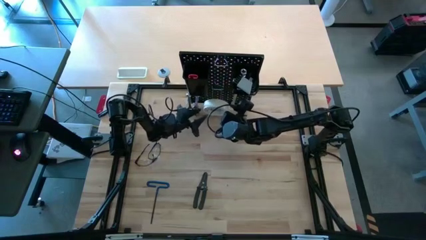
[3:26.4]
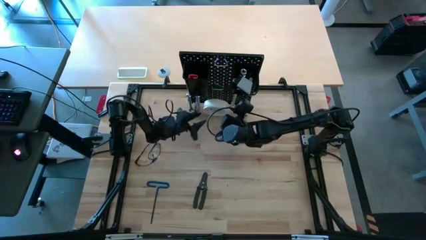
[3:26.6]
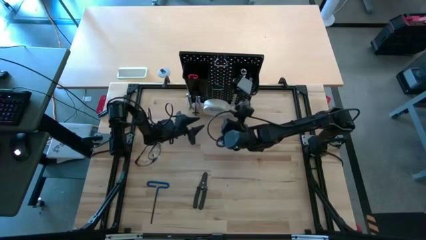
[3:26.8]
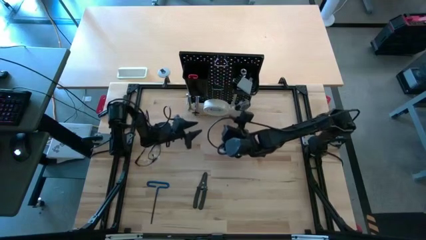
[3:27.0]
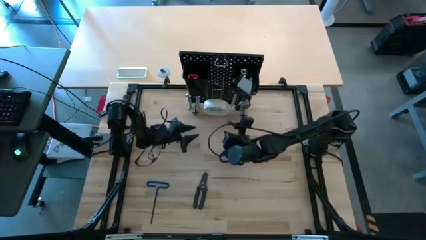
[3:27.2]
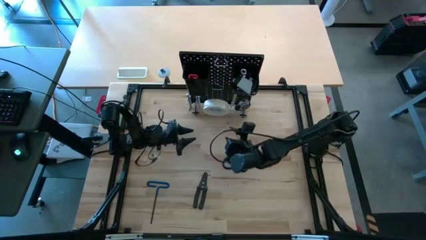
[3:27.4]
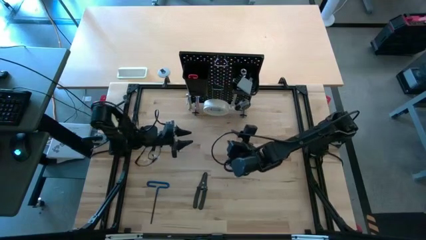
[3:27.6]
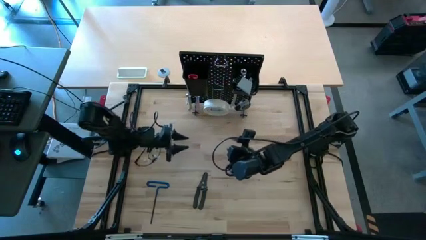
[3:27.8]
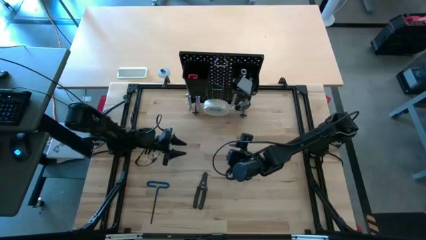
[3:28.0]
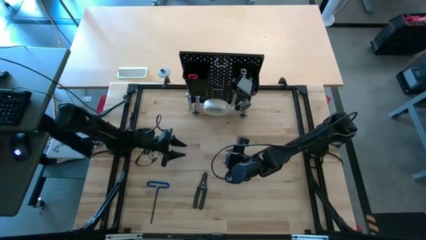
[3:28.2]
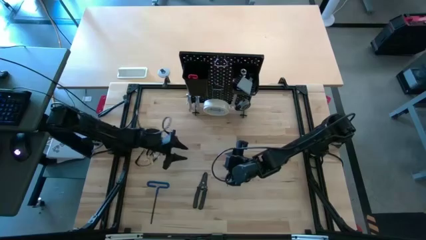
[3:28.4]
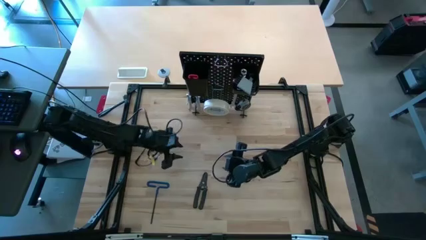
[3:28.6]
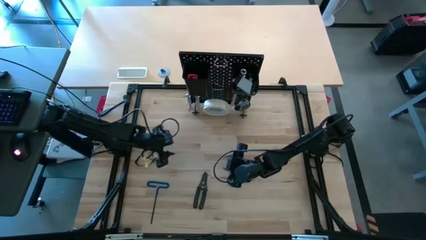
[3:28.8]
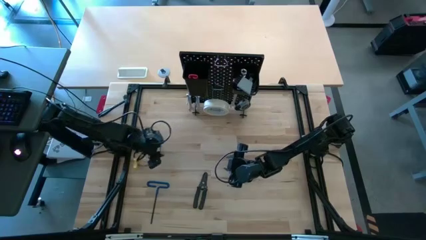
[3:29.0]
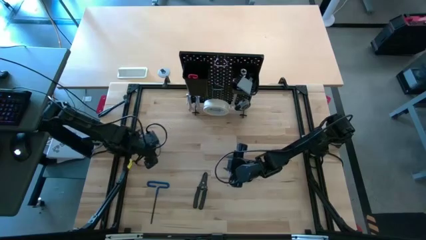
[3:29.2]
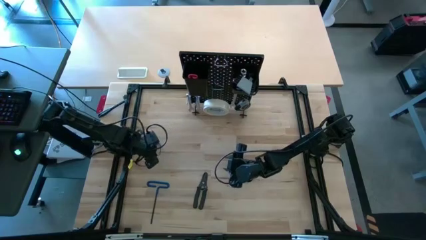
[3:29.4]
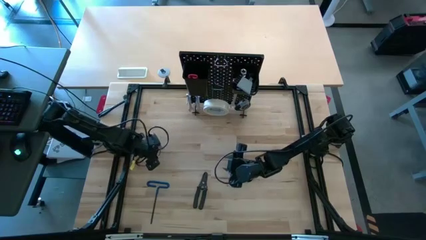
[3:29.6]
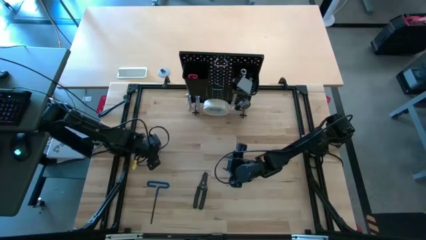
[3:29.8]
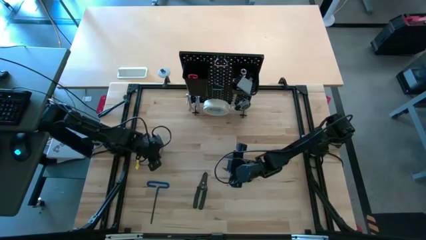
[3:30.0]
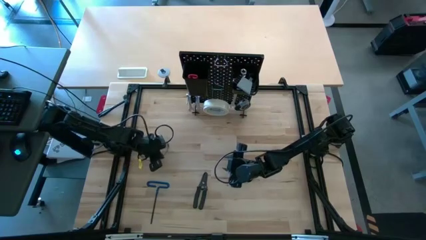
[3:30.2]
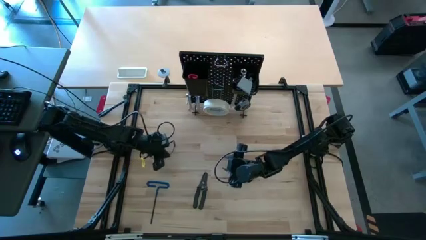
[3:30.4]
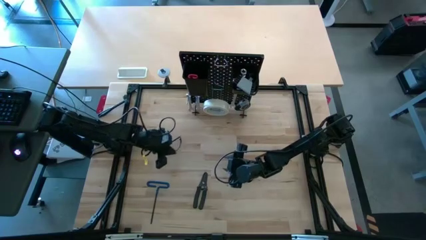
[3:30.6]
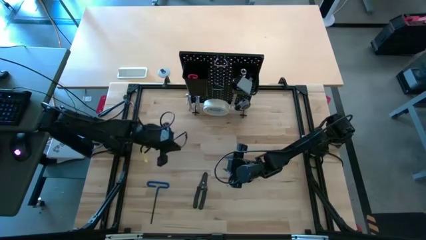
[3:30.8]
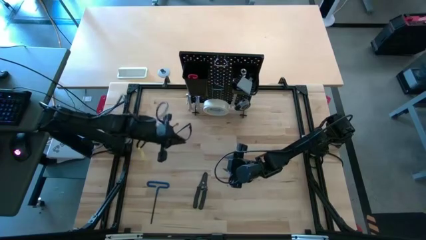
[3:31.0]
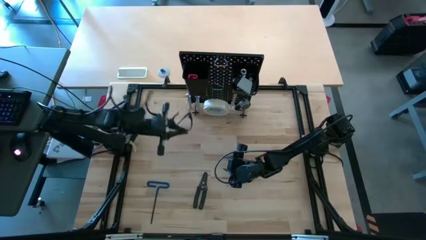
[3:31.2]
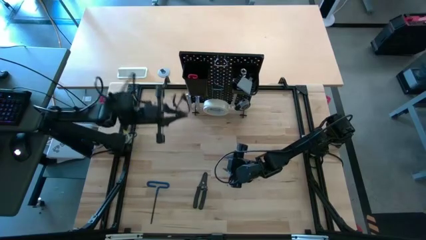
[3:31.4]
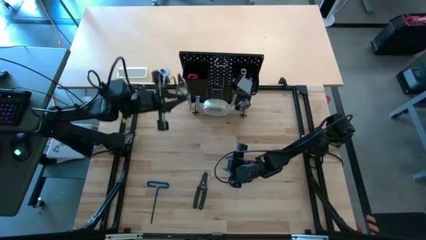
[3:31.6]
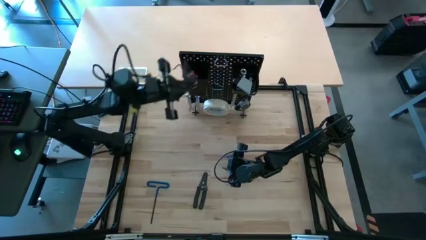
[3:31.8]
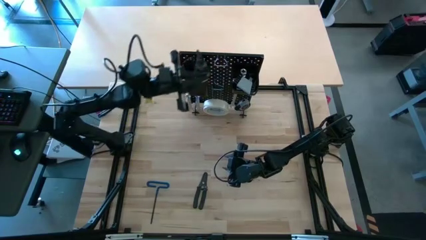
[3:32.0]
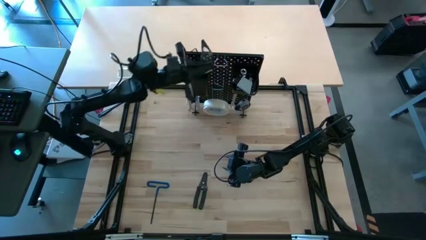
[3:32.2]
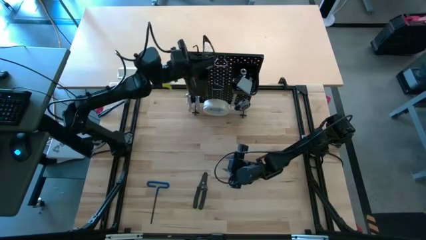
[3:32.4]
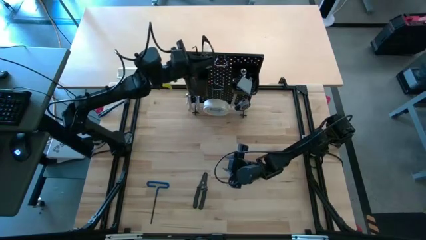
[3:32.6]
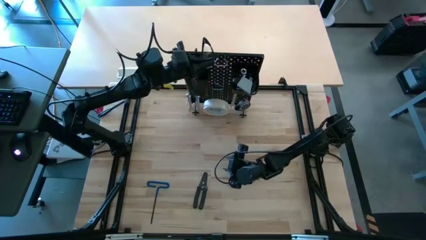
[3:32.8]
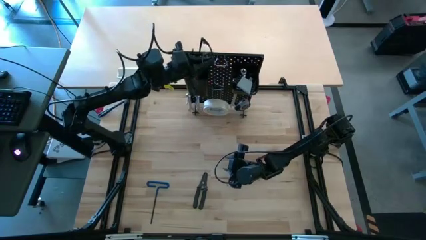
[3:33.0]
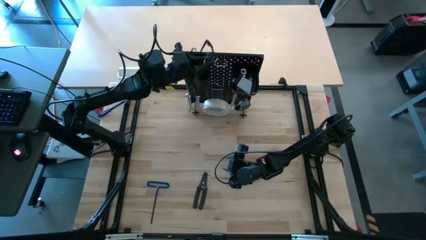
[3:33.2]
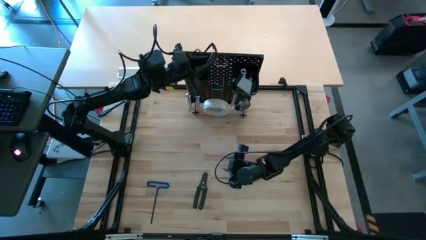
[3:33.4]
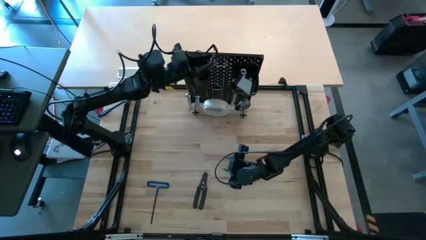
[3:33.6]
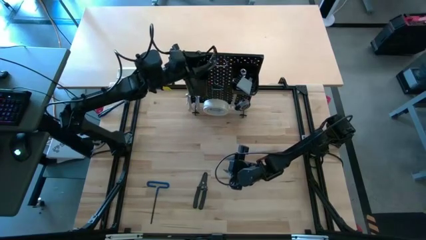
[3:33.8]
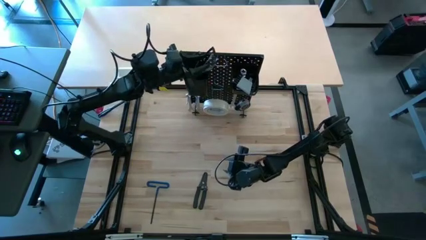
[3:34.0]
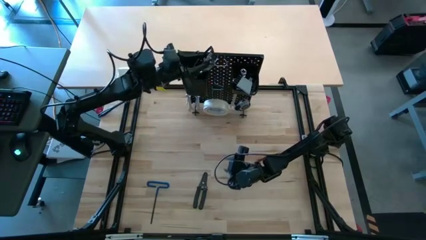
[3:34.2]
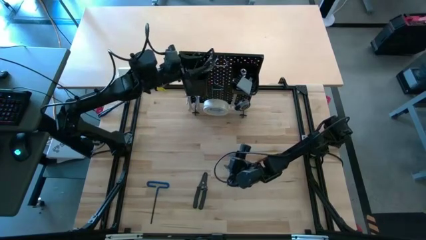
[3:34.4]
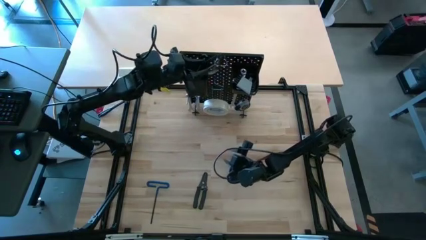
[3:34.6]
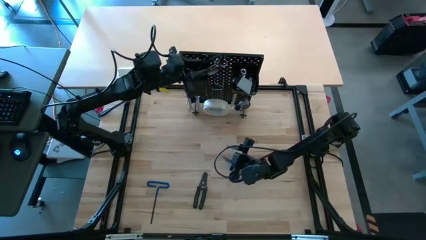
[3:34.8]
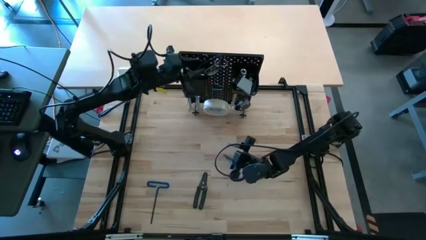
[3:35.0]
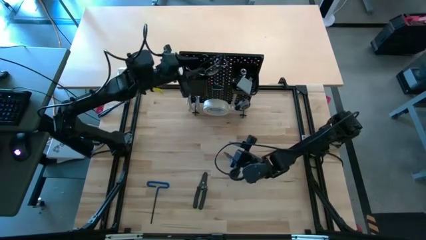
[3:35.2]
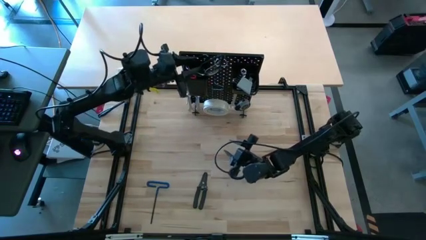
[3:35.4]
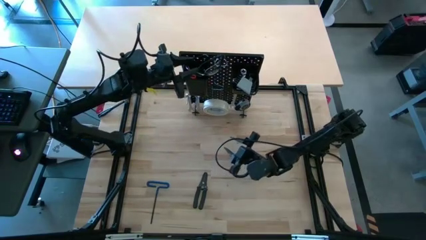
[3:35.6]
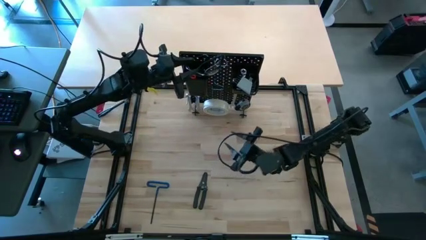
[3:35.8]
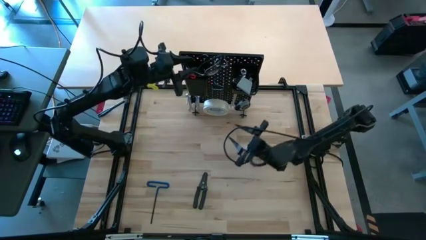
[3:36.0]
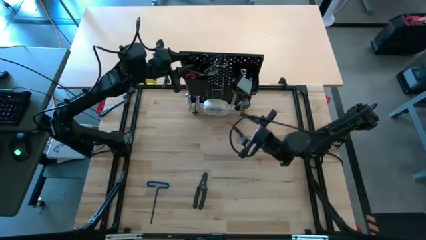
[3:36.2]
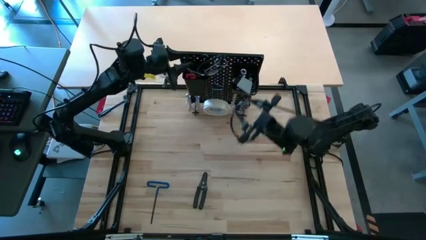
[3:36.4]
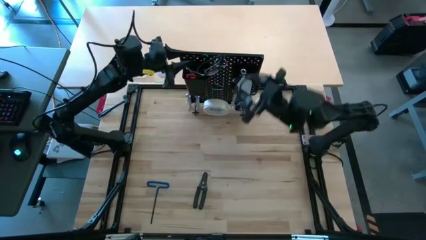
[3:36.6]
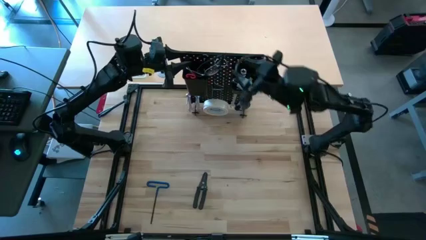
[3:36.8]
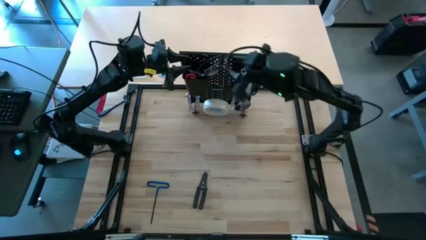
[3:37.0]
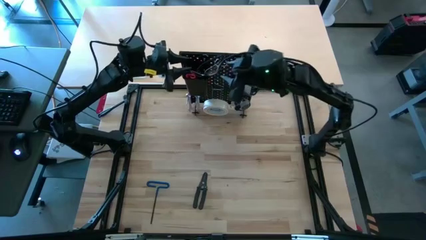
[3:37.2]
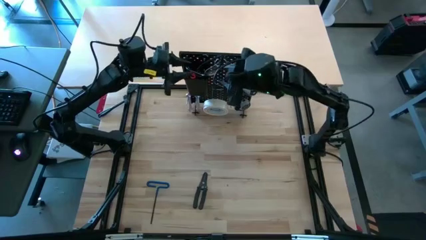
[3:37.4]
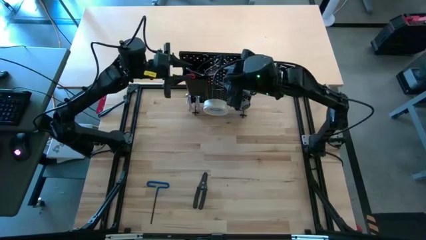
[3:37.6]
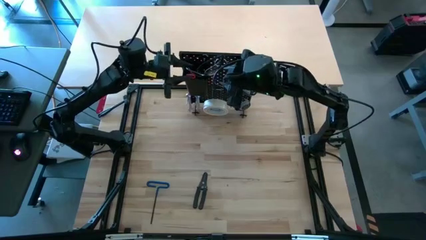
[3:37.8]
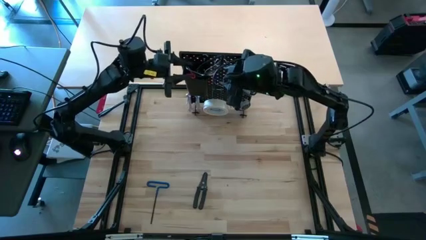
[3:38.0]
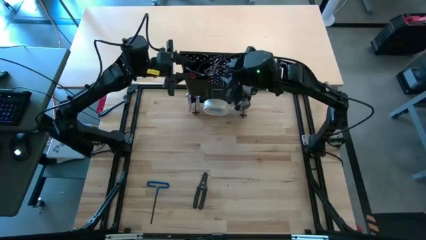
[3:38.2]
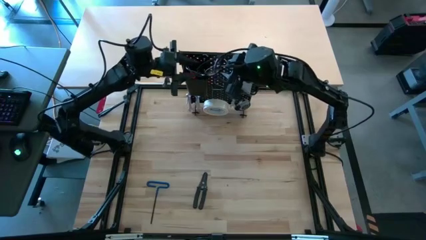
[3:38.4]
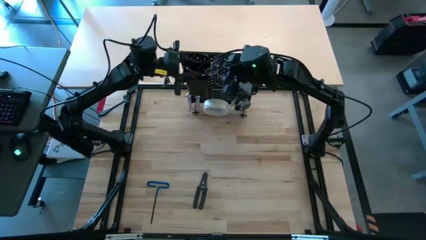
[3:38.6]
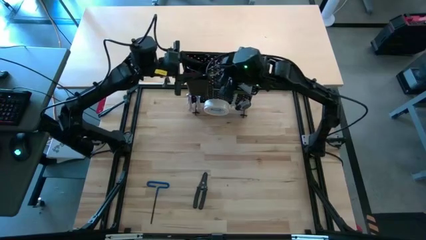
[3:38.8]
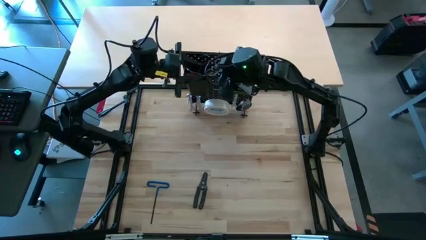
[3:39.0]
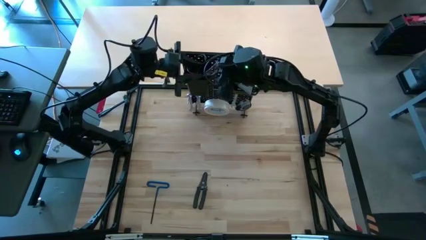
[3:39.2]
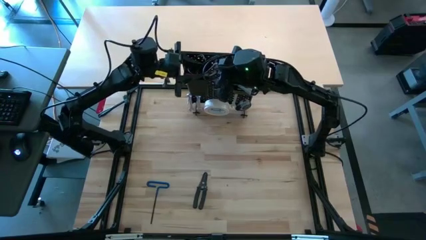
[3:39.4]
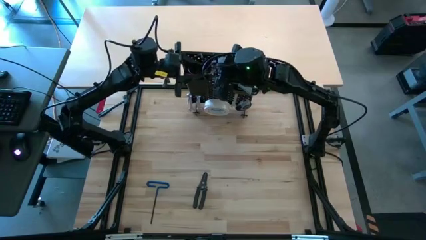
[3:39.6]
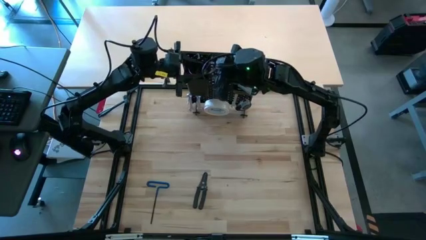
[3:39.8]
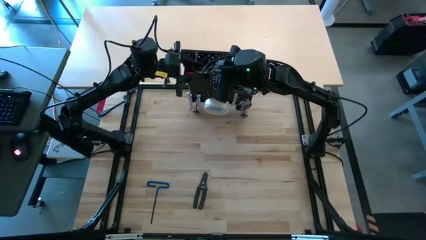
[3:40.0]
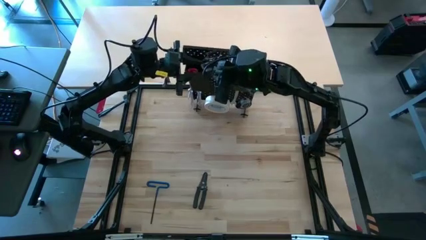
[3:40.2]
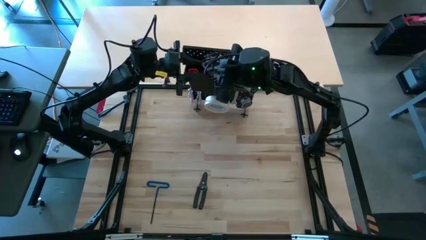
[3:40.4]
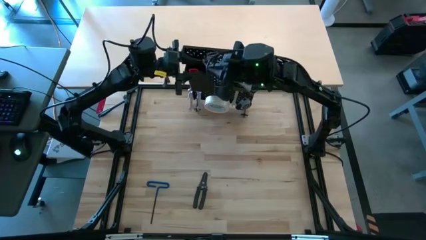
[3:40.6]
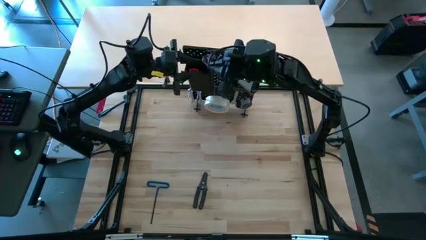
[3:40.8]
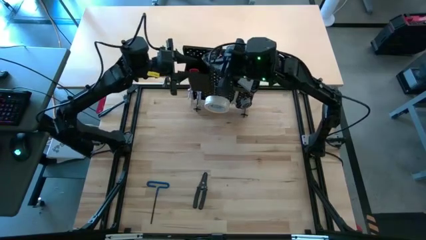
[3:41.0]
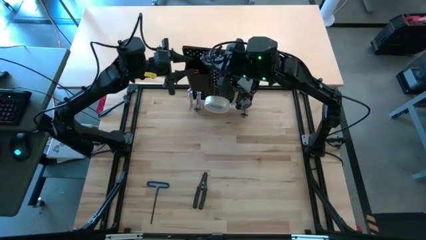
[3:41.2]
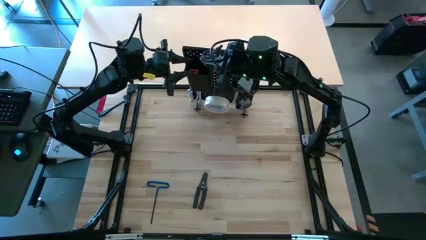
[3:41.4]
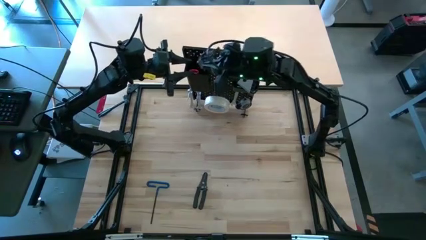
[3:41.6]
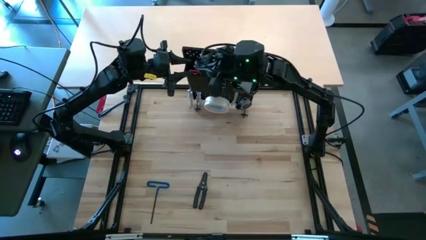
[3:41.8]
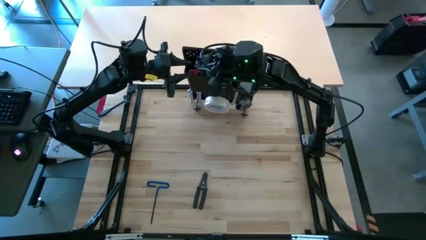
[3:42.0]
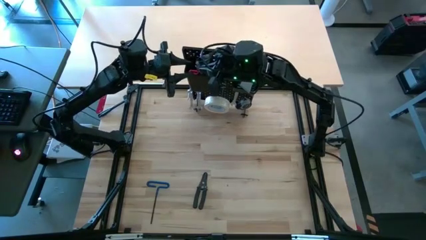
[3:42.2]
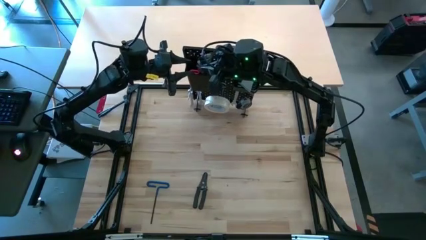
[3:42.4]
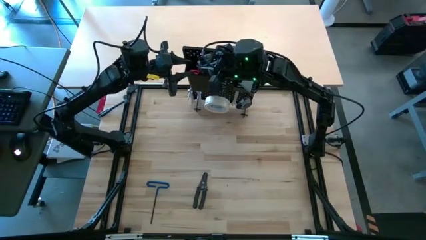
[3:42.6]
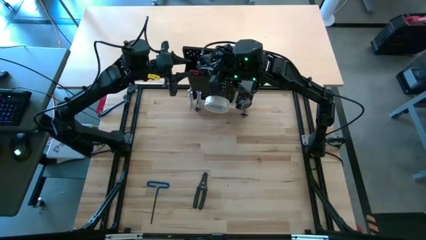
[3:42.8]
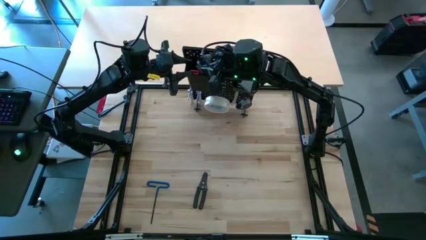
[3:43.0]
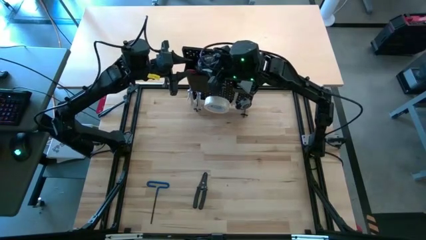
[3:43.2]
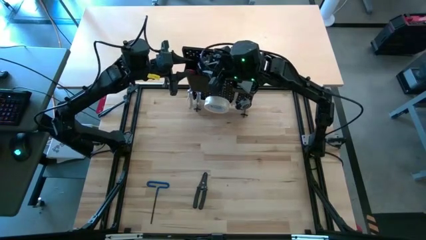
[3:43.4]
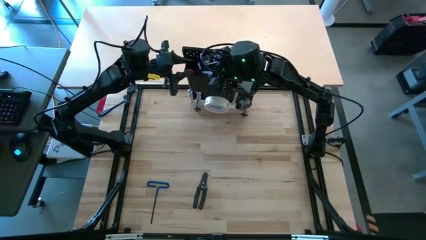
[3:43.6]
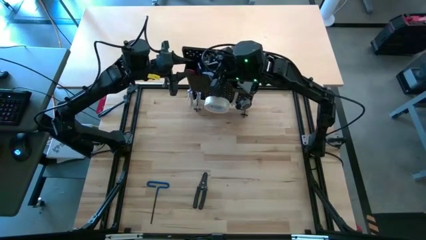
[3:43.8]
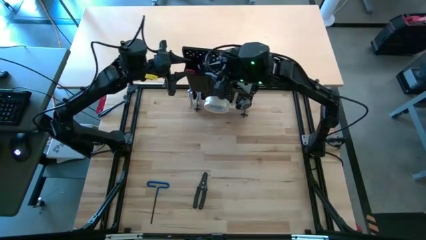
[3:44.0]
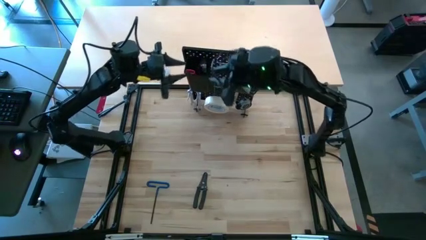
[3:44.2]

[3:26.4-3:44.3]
Task: Hang tools onto peg board
Hang the transparent safety glasses on the pegboard bin
